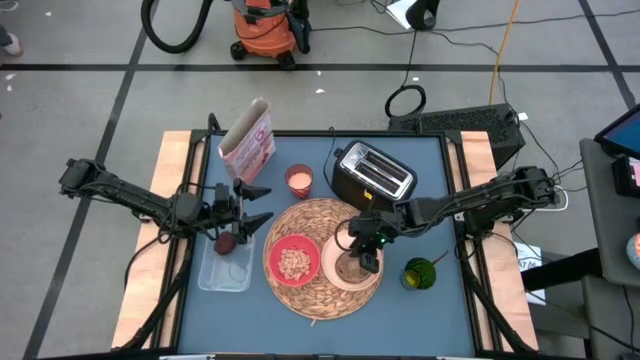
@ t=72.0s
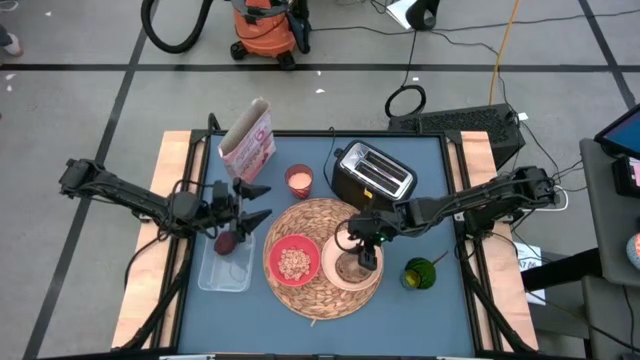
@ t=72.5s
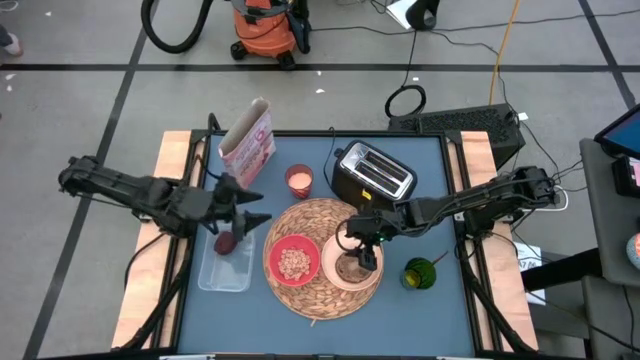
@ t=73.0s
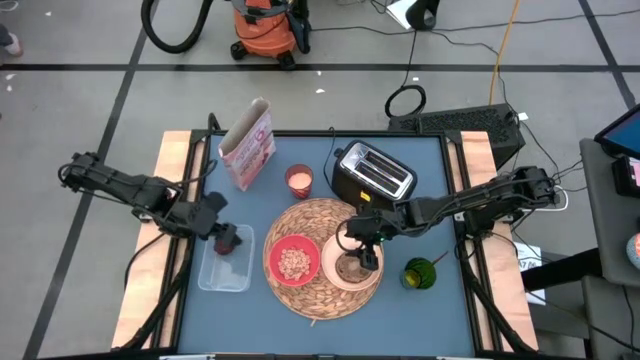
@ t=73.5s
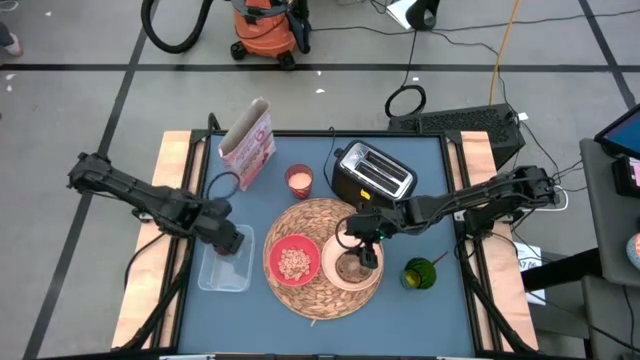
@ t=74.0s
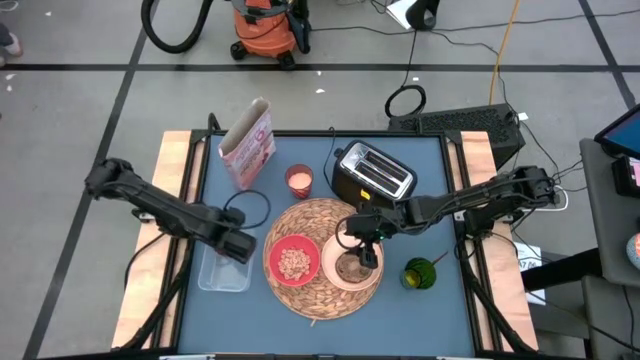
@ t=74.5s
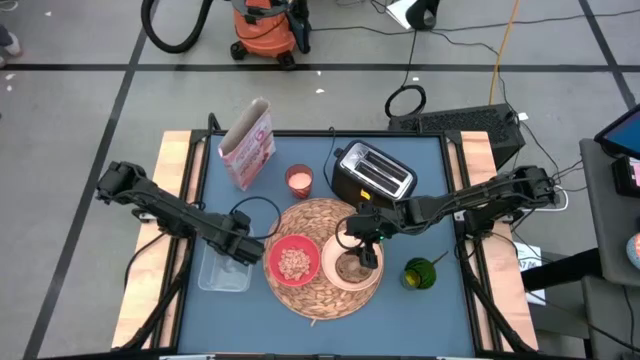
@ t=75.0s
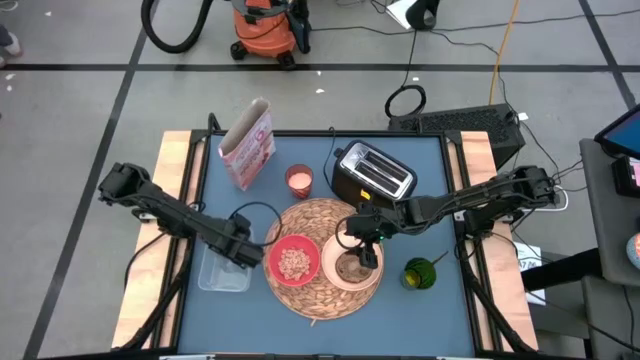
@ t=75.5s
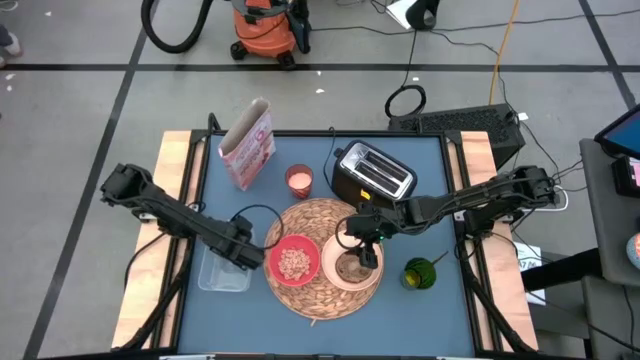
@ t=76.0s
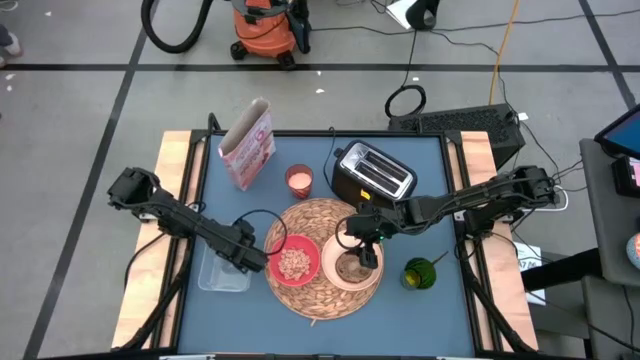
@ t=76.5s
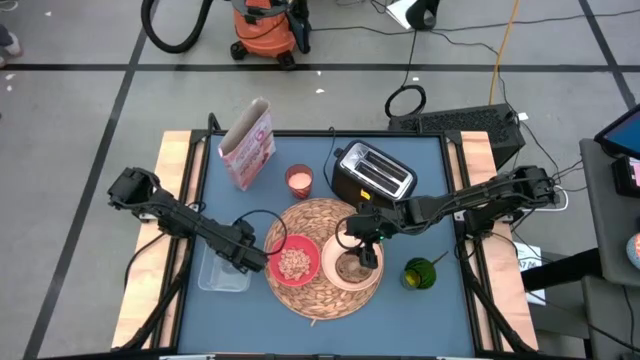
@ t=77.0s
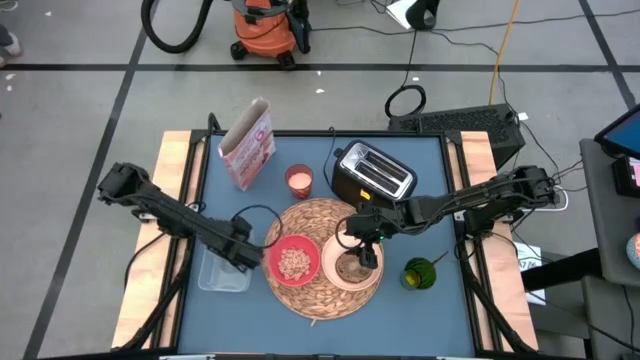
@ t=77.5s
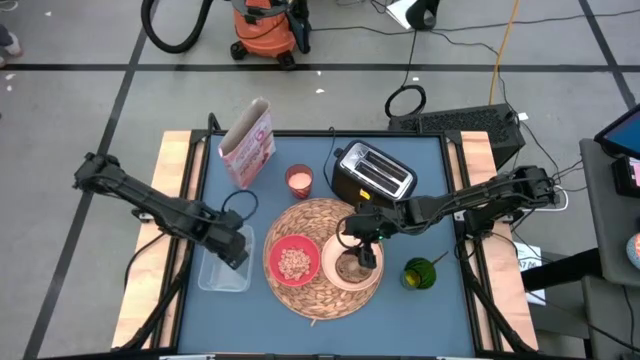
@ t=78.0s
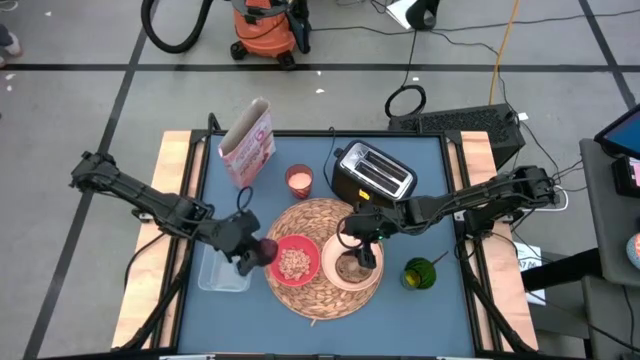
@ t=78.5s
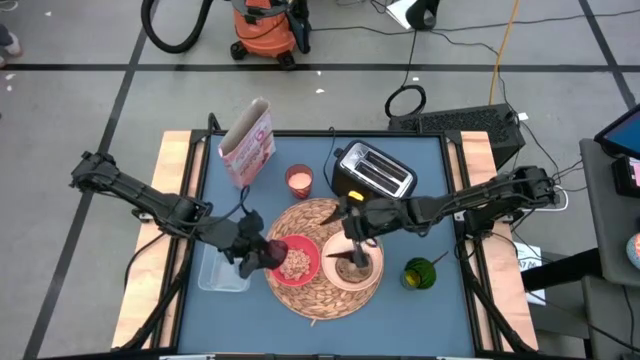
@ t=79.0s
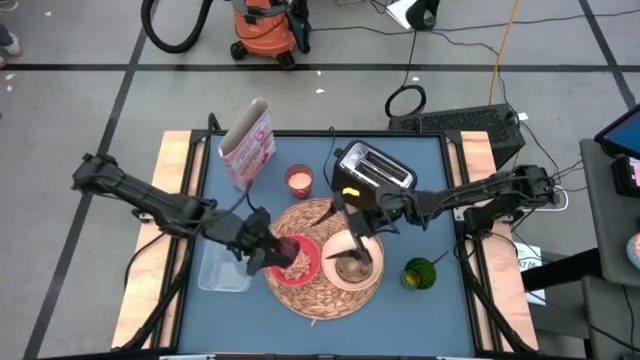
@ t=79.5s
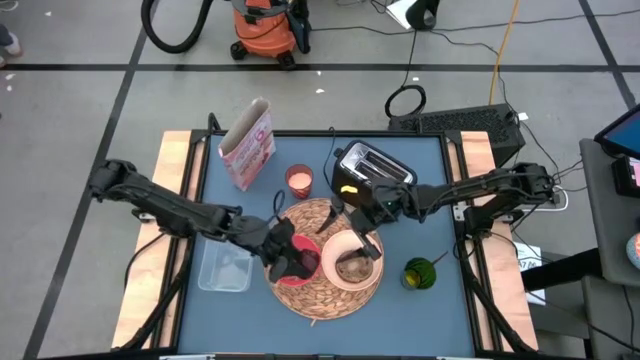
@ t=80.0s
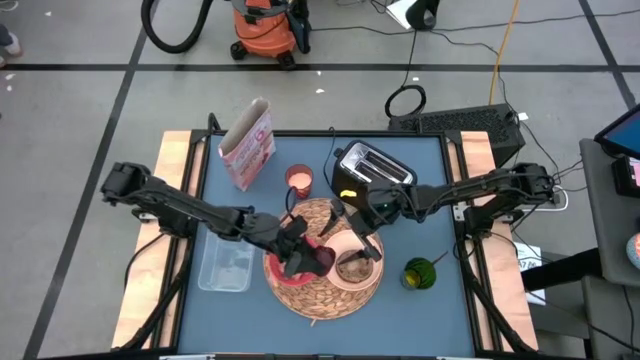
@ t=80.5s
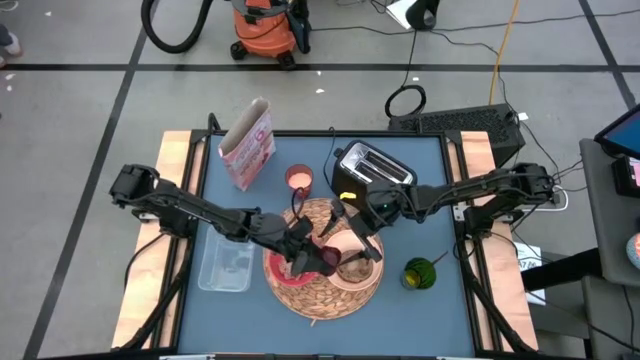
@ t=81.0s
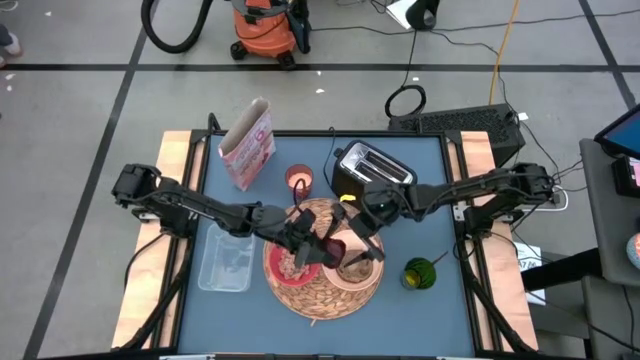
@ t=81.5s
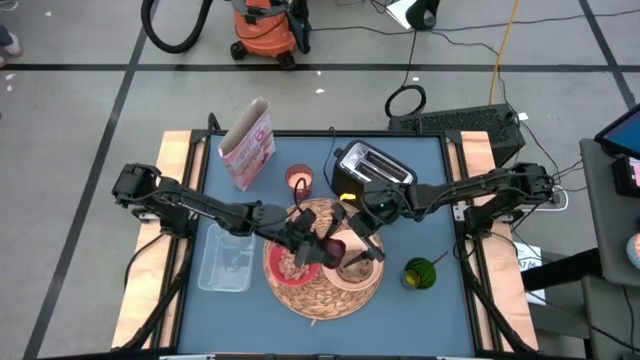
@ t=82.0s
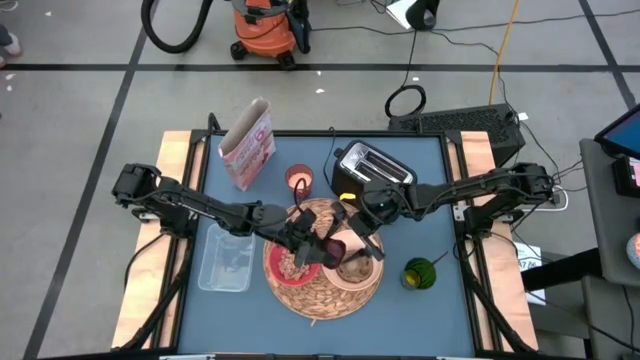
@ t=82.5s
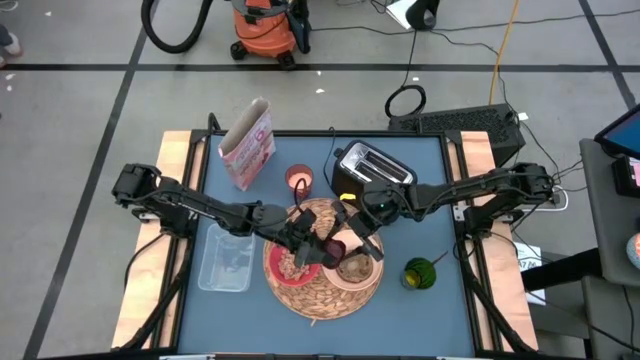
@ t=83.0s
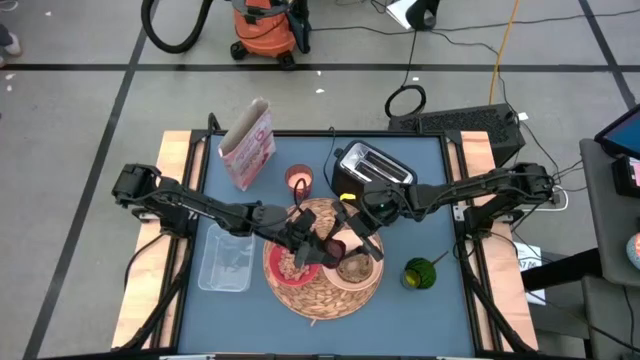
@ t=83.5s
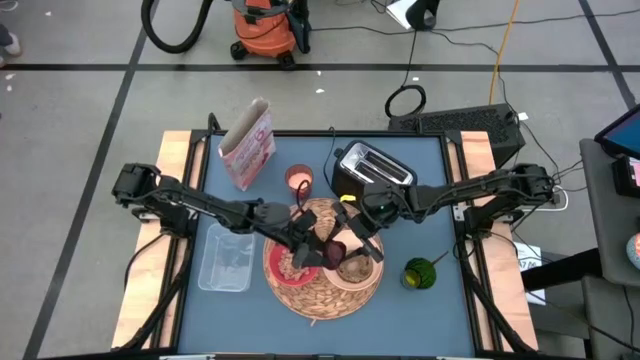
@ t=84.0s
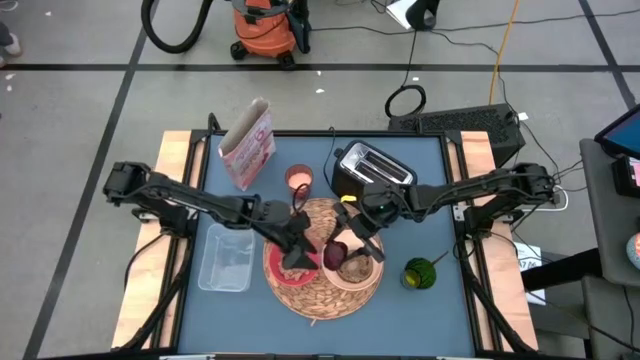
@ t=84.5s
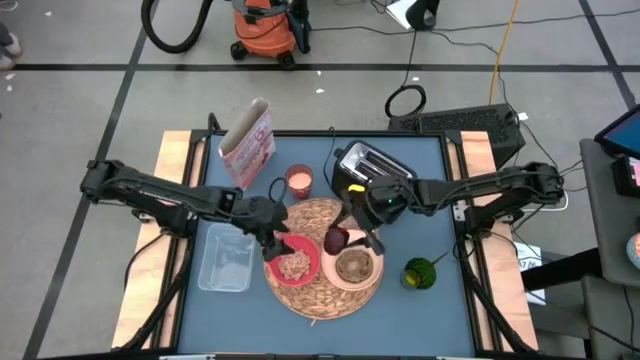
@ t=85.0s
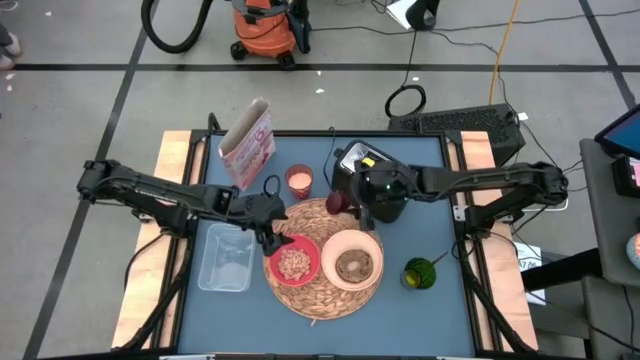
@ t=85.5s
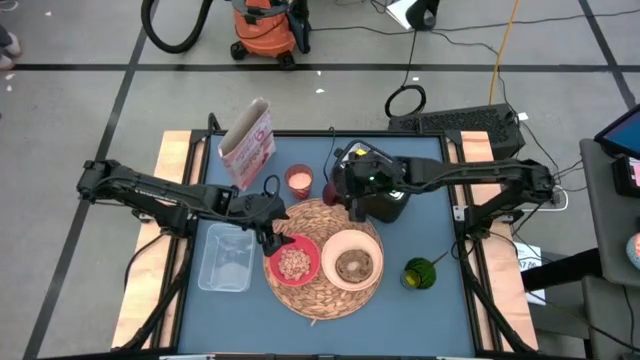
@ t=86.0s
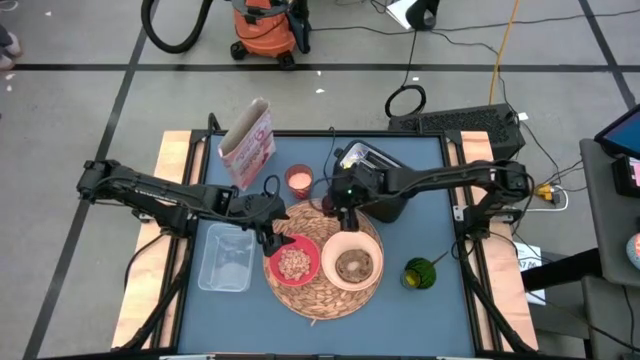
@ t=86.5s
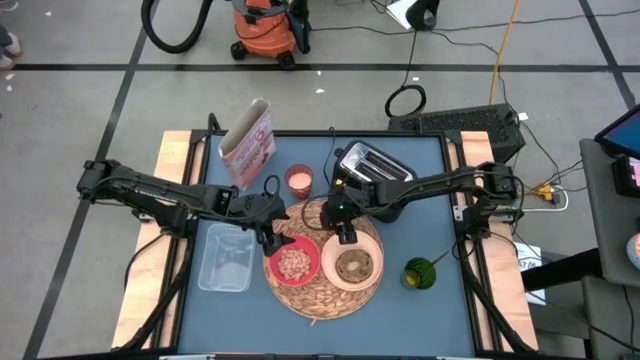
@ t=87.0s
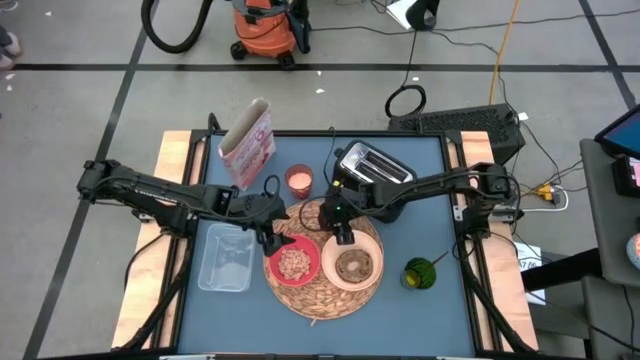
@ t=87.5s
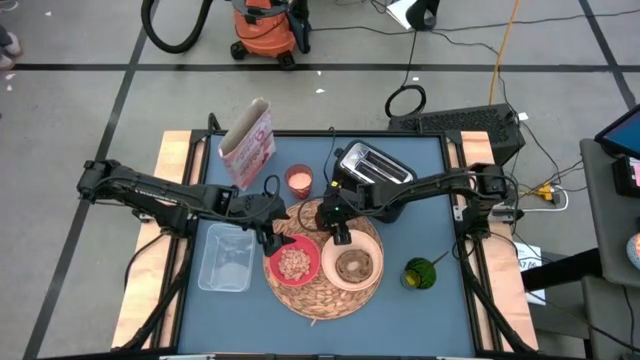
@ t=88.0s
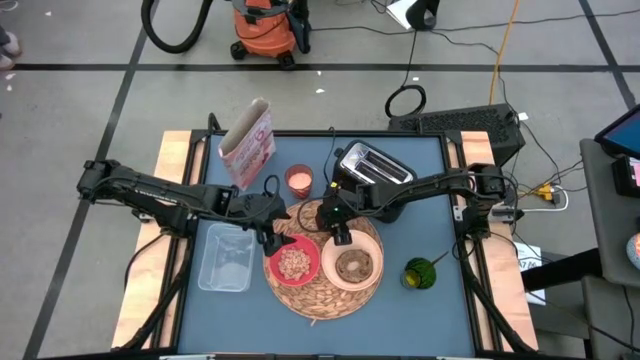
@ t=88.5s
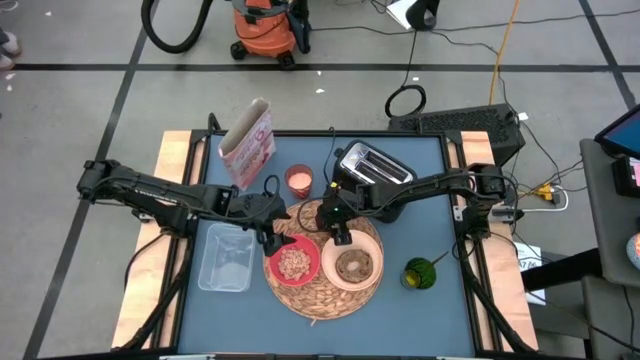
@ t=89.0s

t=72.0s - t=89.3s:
Task: Arrange a breakfast setting
Put the apple from the transparent bin to the top left of the orange plate on the placemat
